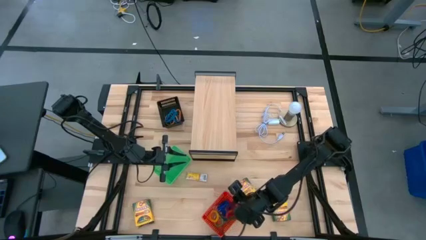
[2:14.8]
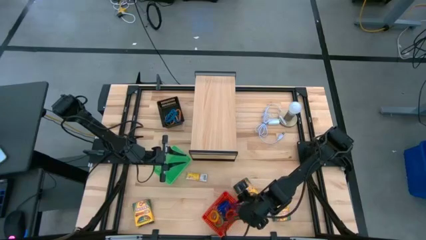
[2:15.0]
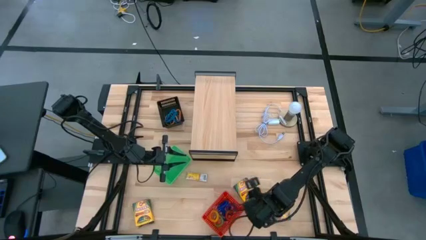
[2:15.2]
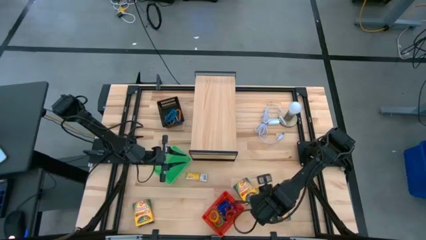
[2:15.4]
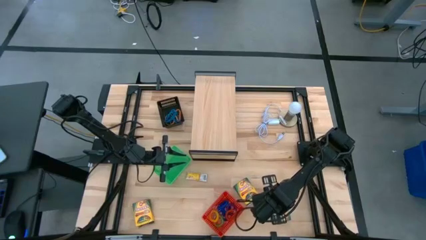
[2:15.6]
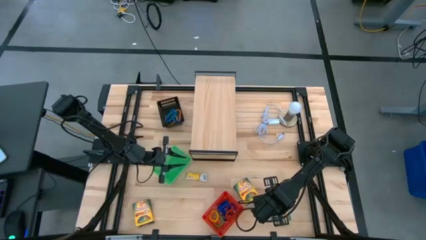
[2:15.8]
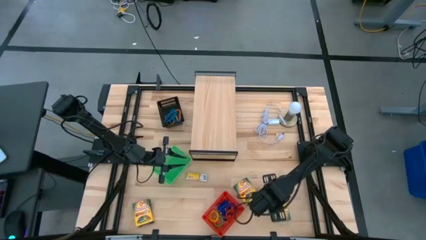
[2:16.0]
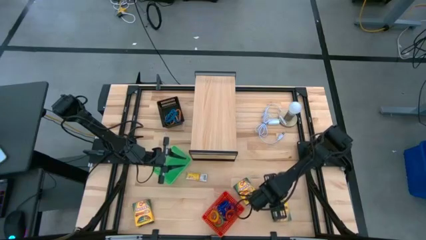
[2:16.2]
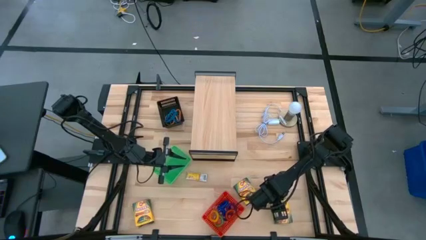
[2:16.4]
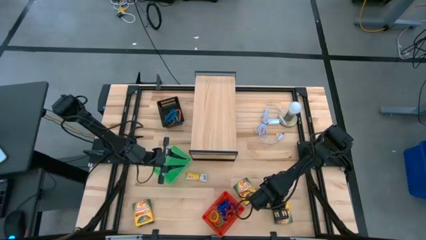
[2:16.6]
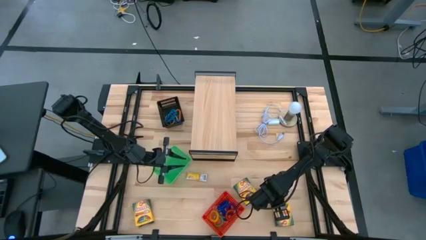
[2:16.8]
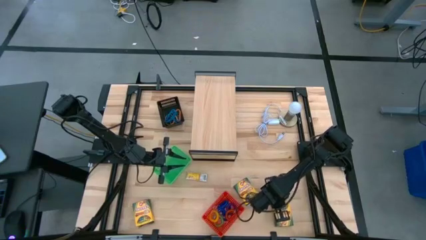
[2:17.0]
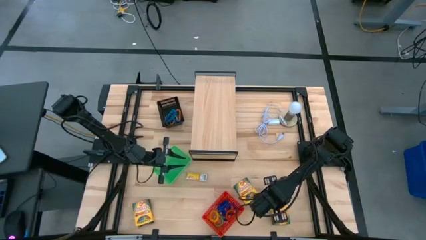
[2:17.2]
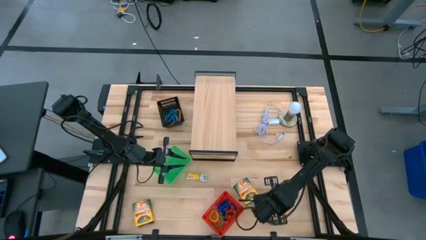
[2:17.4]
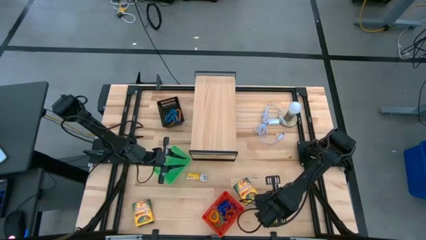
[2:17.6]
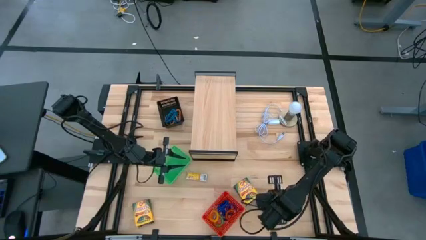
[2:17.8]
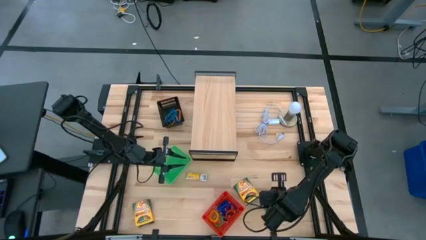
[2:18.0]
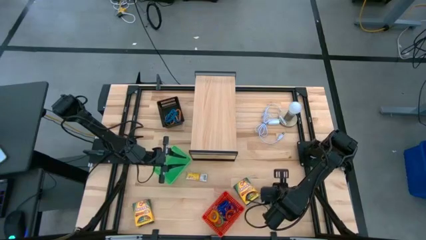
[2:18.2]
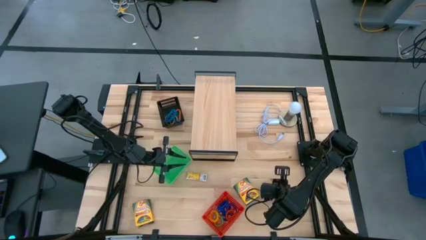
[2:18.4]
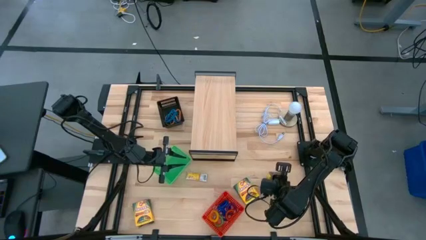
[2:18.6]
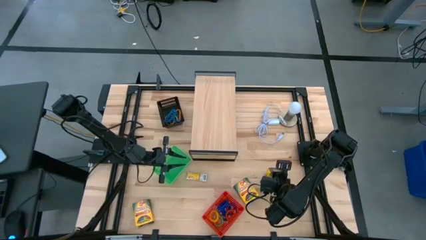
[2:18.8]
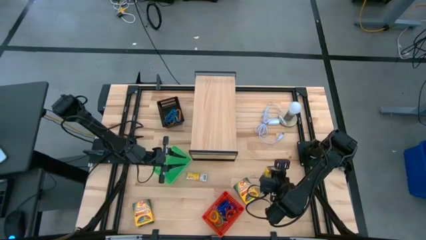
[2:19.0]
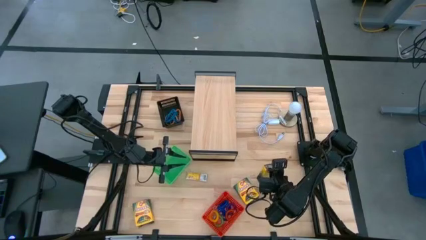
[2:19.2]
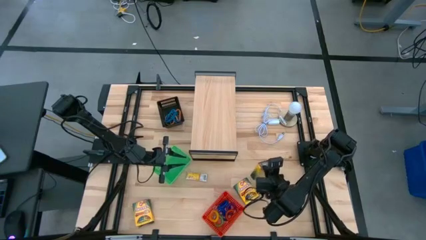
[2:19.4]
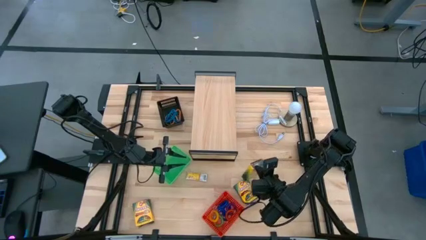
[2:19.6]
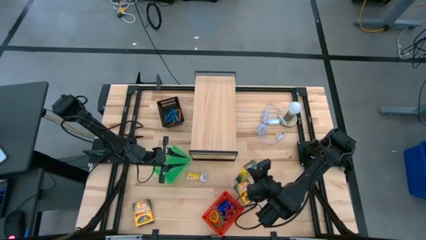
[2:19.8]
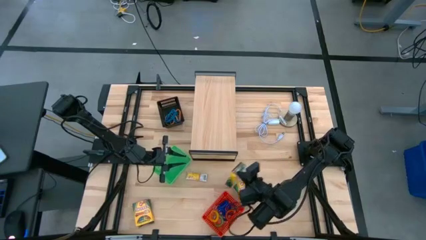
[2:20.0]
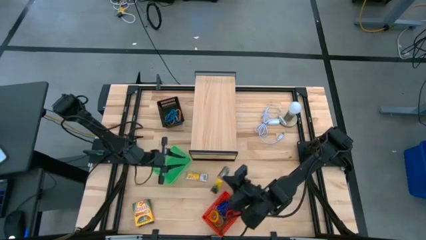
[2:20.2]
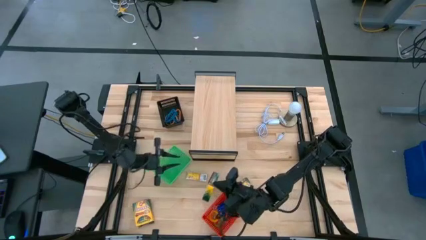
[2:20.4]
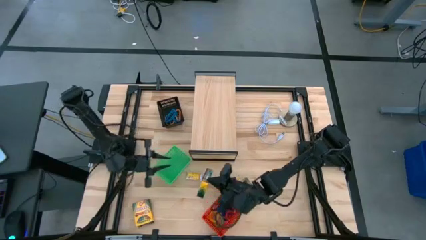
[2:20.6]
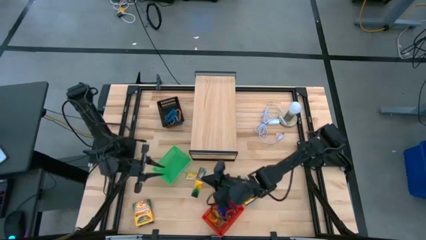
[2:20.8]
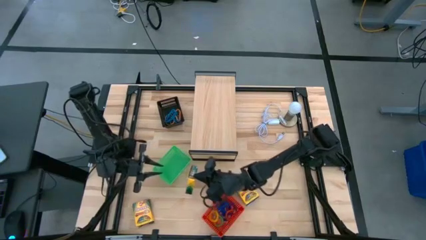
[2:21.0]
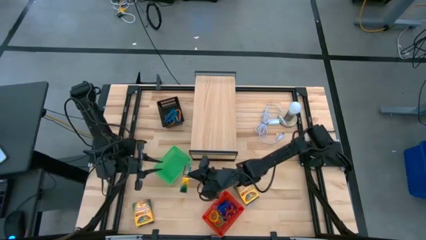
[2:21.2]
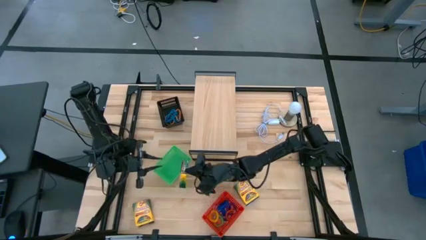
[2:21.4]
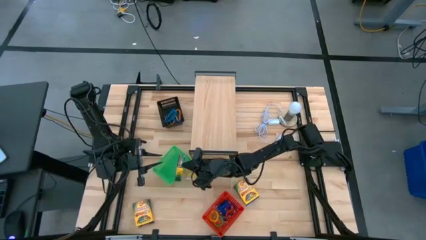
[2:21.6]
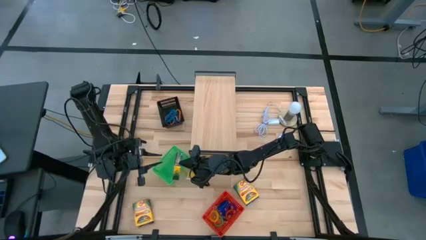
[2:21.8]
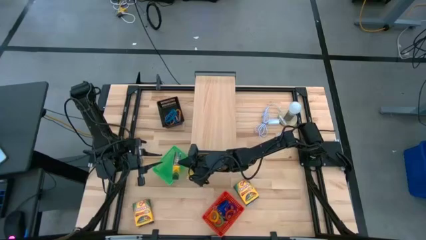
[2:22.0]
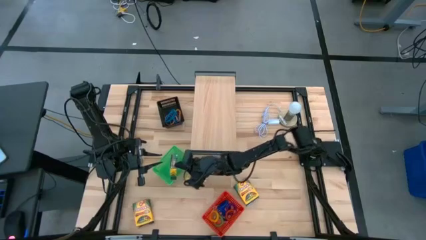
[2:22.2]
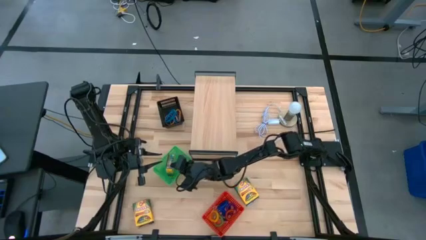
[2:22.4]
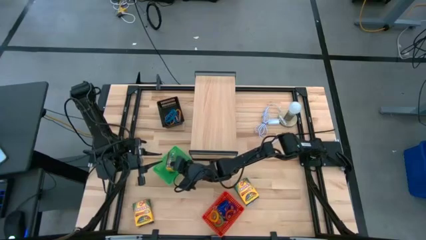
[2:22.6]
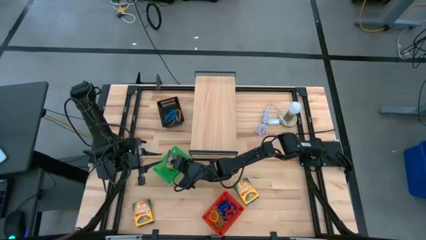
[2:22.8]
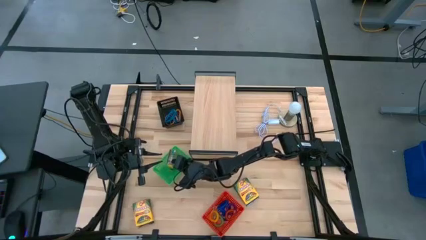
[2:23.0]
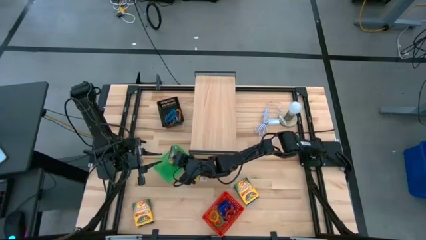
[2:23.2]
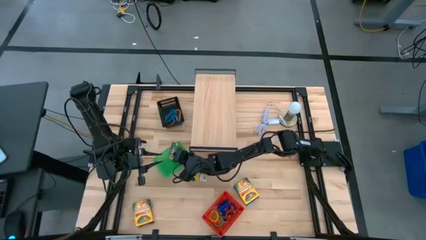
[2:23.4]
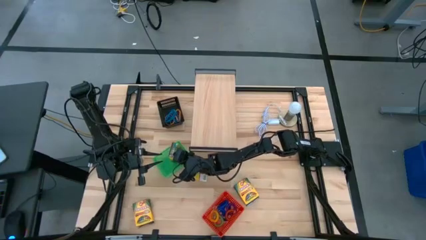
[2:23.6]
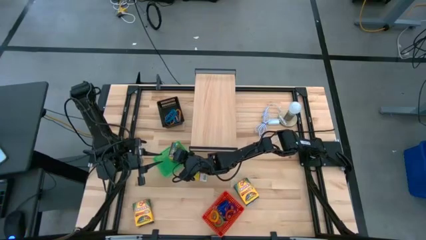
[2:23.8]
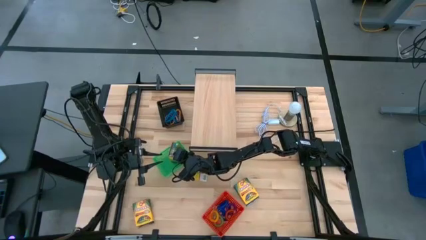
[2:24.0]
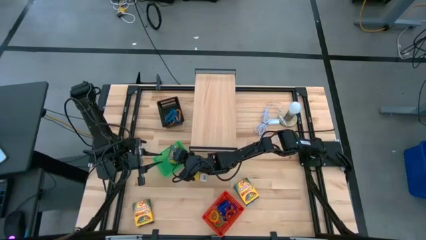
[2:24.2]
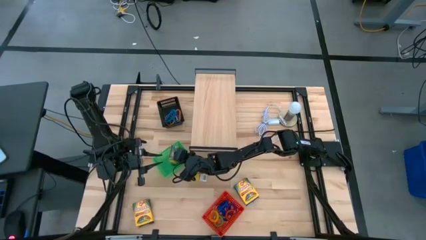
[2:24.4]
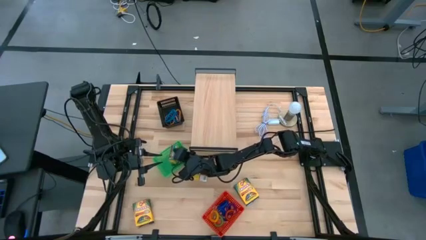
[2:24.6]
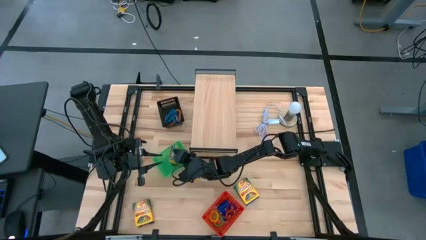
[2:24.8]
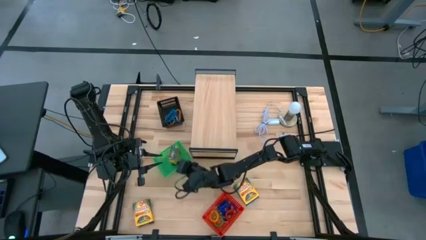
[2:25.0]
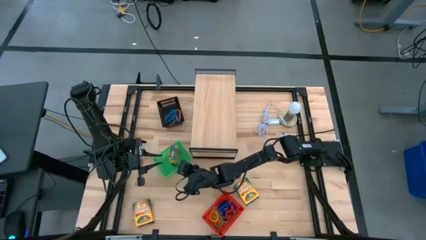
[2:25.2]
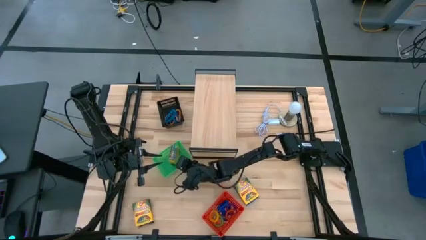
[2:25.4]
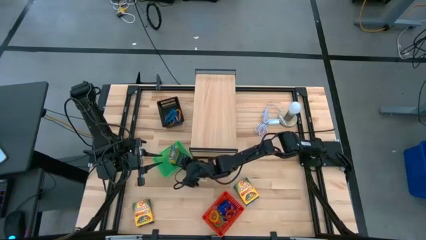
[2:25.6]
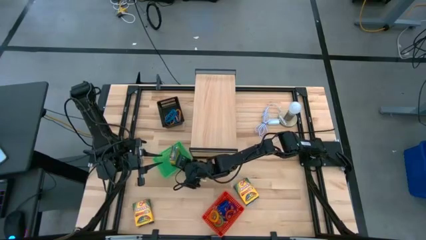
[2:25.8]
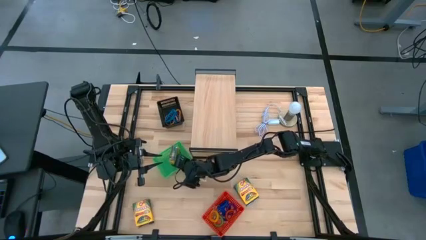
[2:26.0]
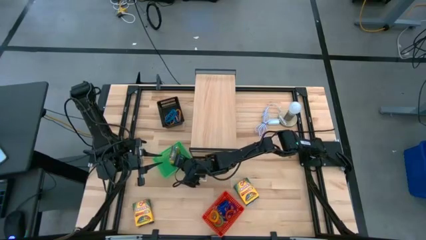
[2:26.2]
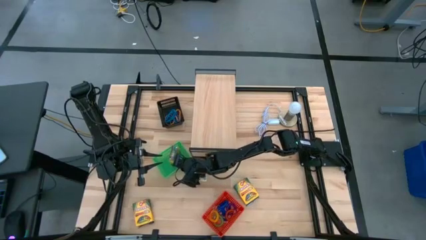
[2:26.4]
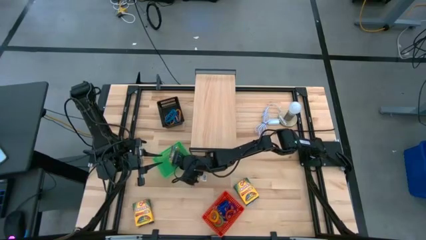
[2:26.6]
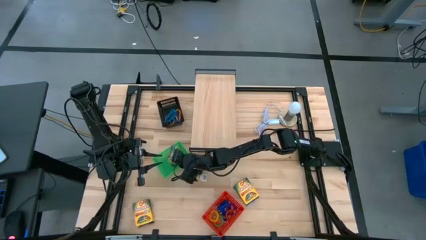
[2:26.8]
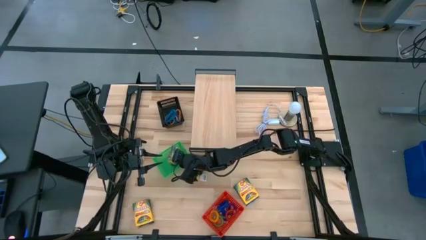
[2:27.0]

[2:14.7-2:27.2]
Task: Pick & Place Office Desk Supplies
Put the right large yellow crayon box into the green basket

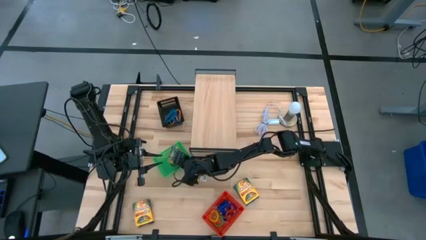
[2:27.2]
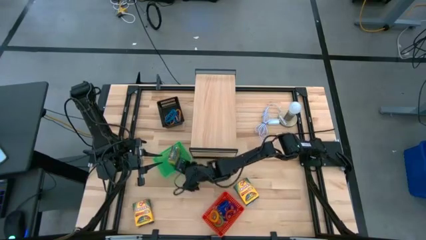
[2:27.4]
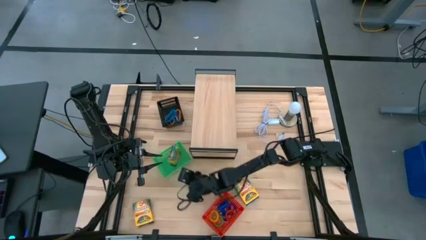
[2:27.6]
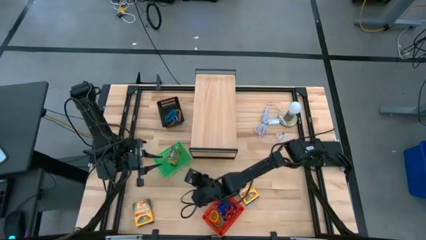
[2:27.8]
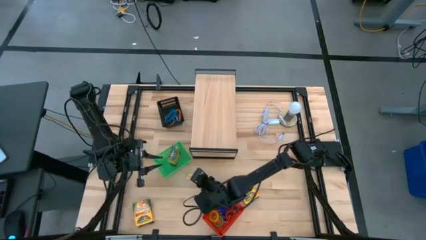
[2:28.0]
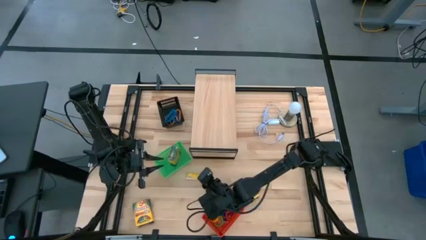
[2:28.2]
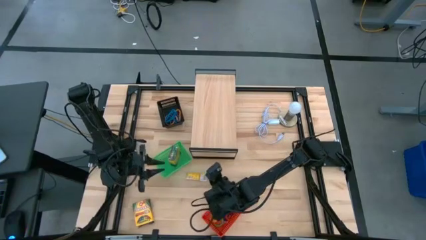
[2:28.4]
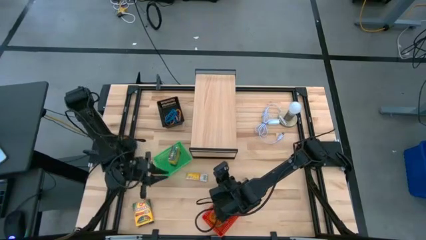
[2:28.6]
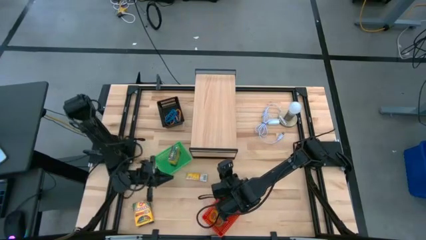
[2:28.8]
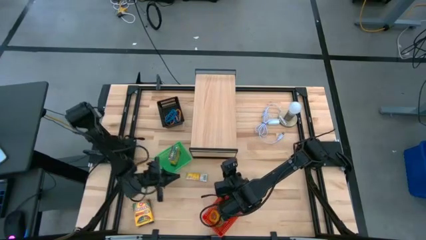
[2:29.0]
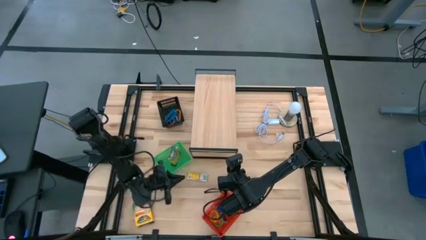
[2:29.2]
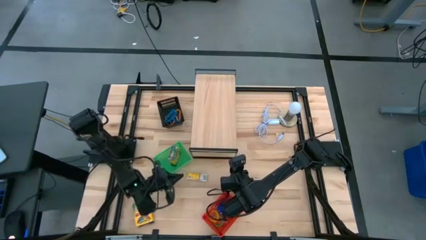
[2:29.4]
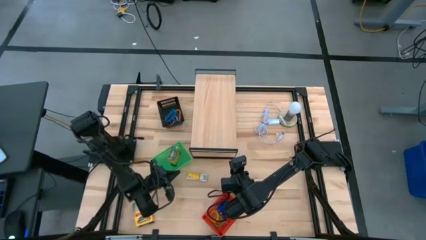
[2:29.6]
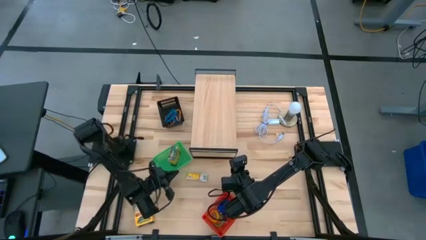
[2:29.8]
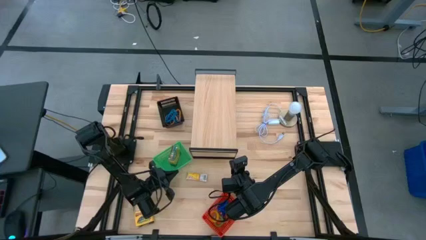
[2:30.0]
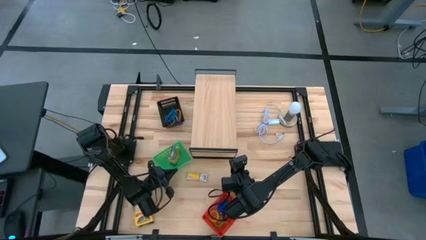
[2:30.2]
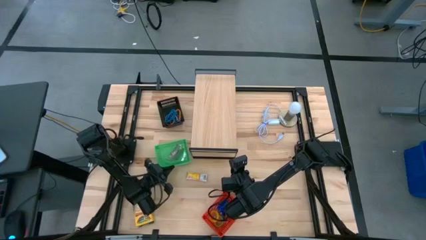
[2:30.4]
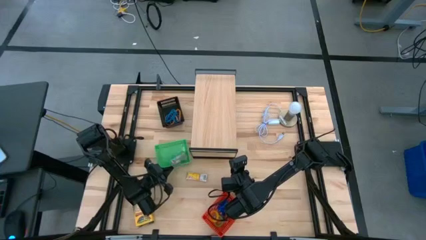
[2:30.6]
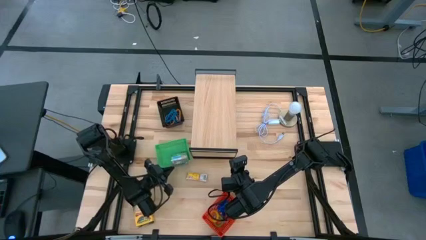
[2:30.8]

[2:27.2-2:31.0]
Adjust the green basket on the table
